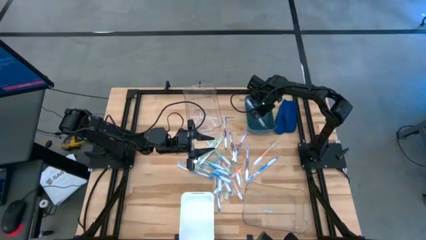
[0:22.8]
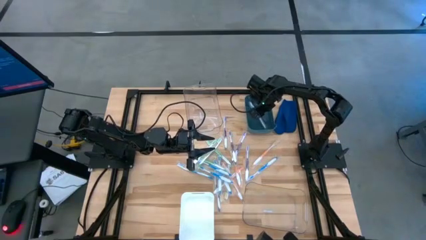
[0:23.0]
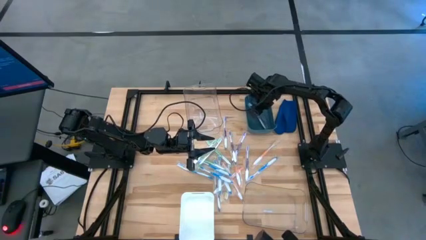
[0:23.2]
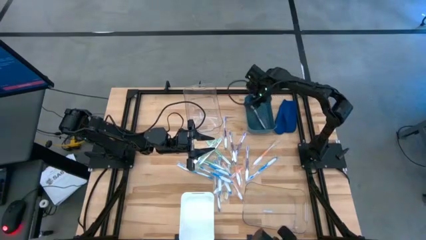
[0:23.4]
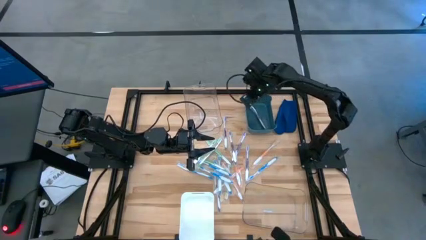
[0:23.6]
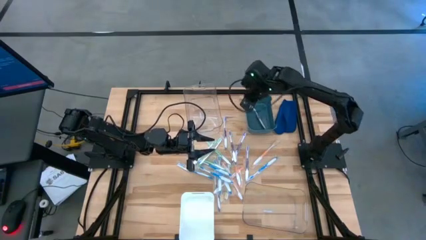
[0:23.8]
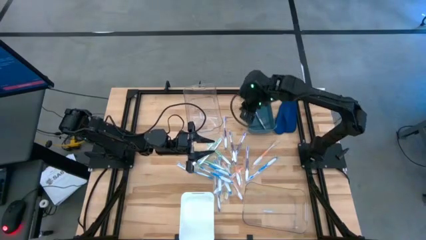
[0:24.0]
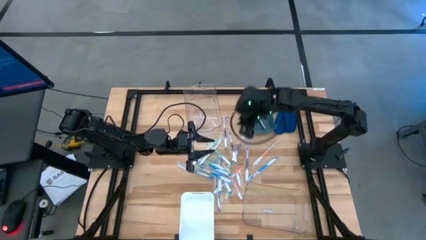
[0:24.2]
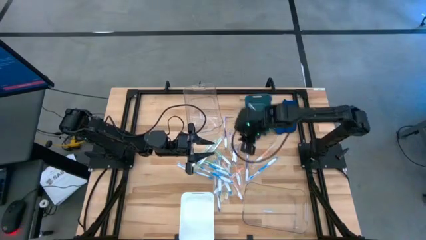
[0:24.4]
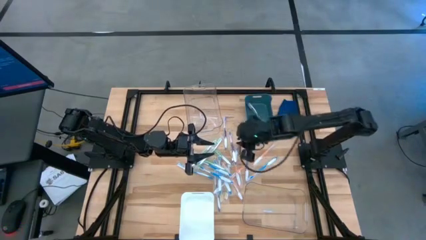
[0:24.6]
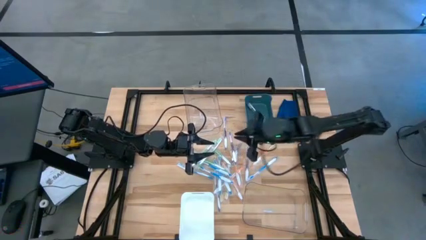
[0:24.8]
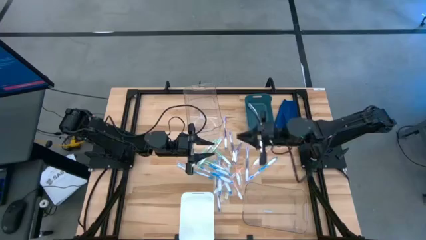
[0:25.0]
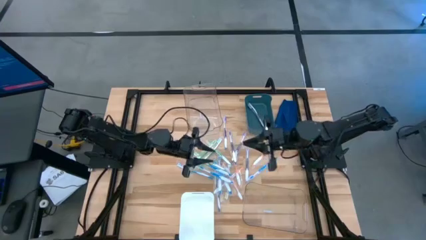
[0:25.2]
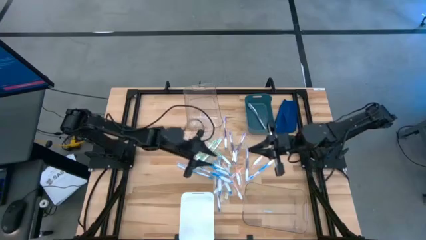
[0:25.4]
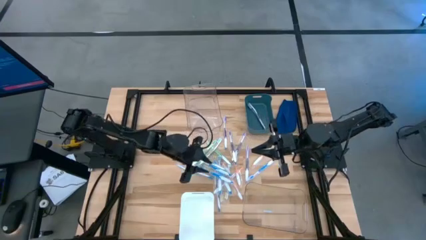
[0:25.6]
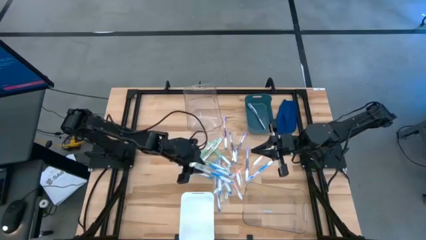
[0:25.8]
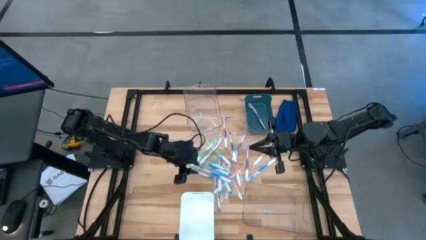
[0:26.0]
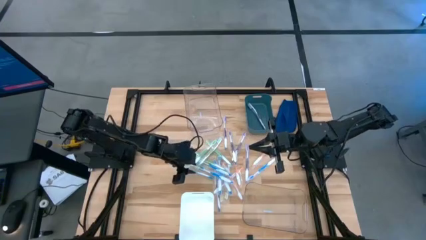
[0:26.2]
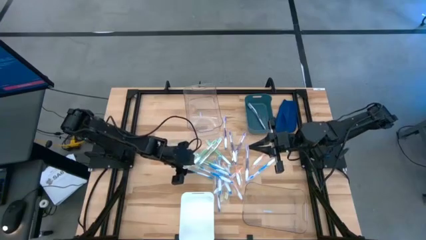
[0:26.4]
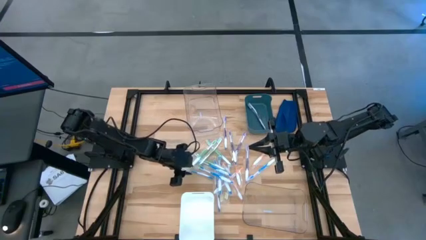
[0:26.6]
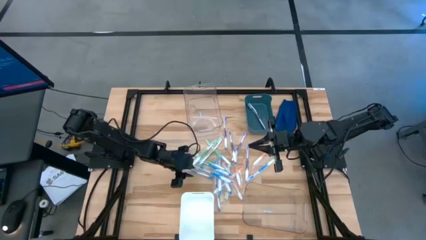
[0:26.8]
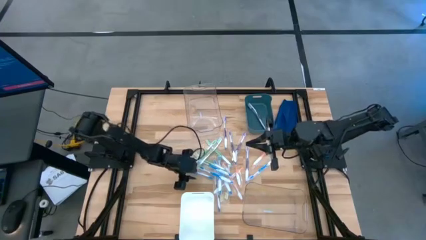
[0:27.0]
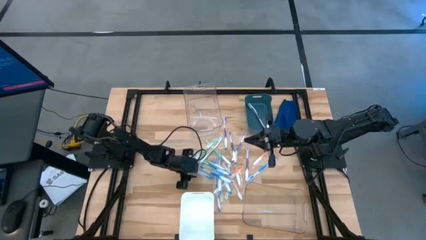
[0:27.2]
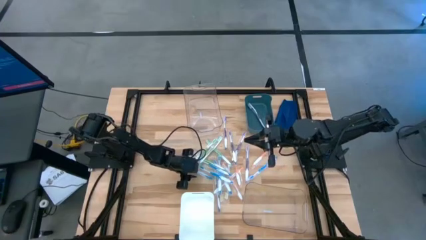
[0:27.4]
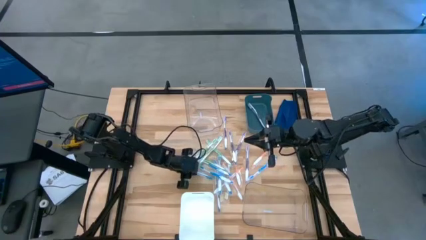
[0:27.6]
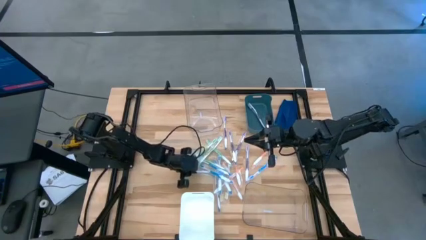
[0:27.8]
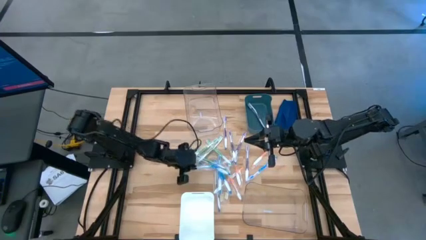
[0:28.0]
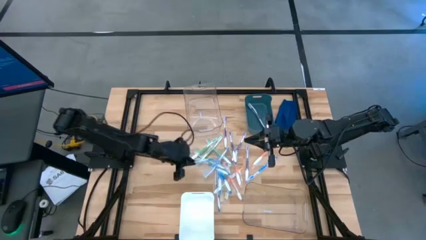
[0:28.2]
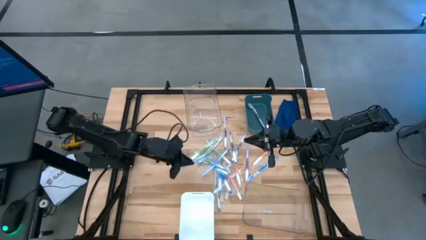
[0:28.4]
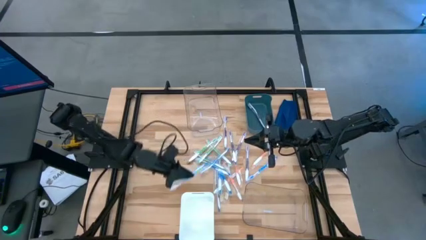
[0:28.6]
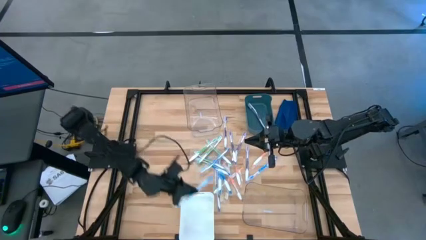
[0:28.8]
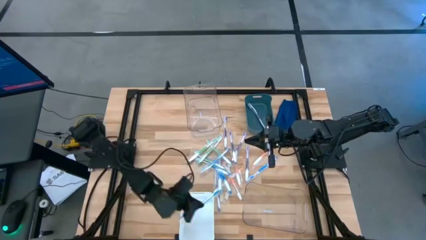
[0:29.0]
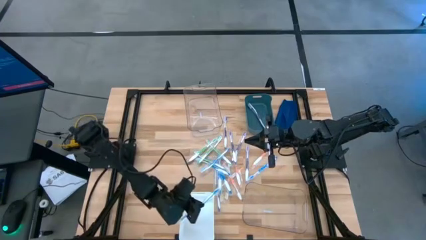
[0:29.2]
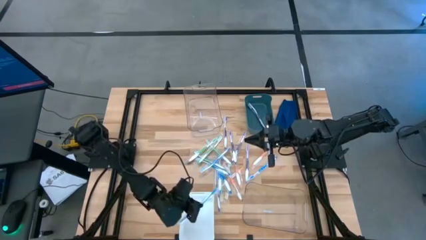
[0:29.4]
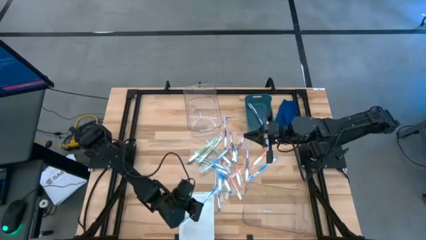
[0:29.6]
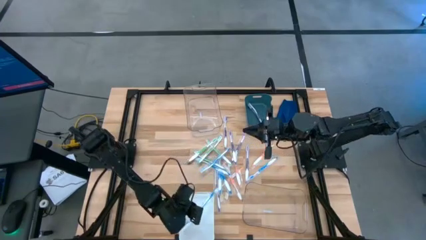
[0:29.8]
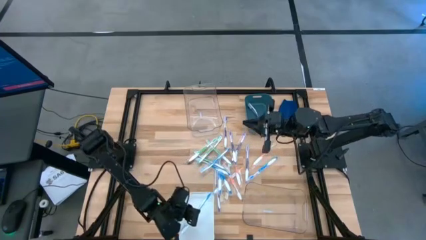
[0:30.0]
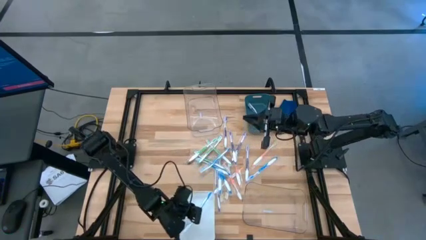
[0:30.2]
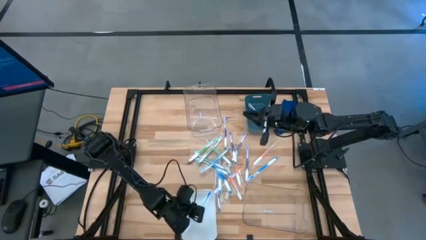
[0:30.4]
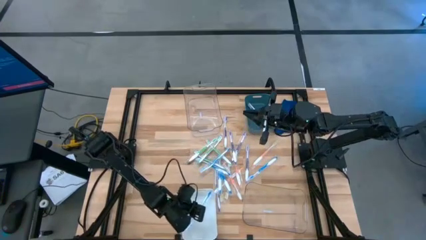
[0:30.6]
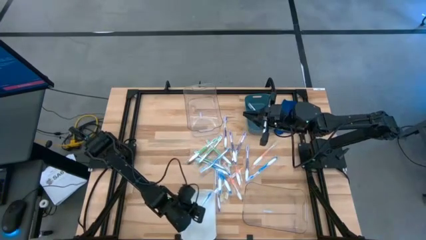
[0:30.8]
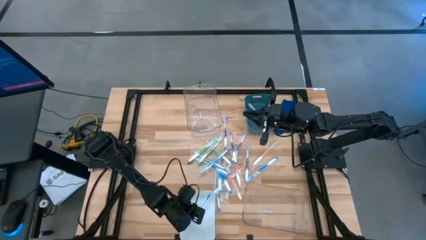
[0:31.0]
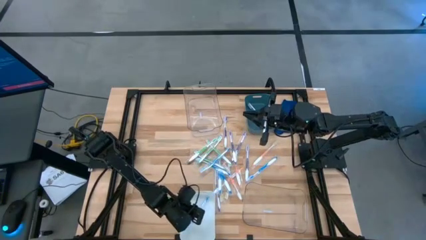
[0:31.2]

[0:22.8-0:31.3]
Task: Pick & Place Toothbrushes
Put the blue toothbrush into the white bin

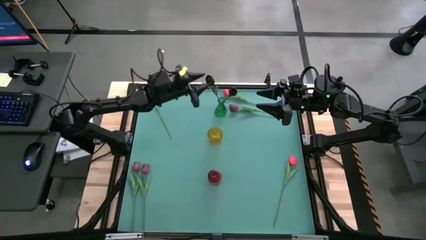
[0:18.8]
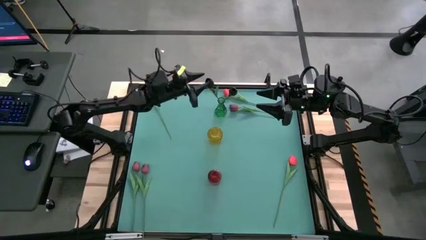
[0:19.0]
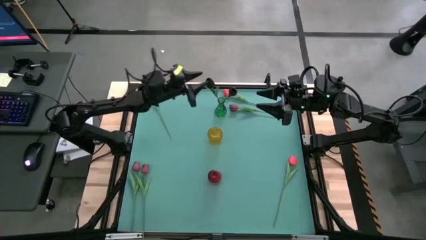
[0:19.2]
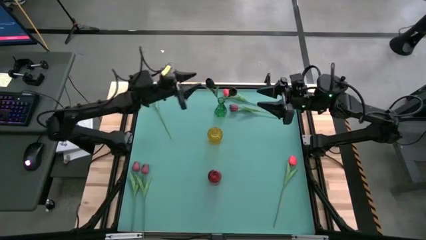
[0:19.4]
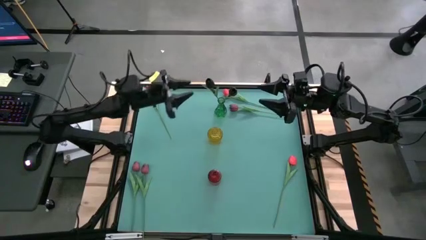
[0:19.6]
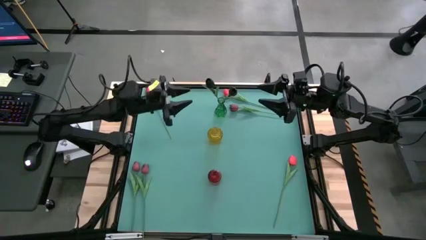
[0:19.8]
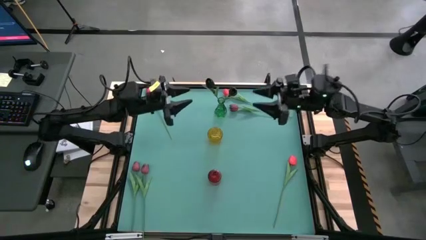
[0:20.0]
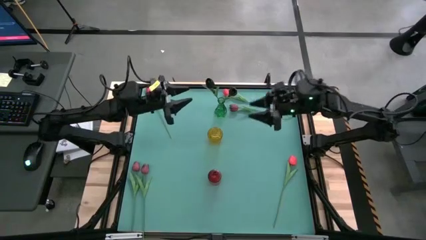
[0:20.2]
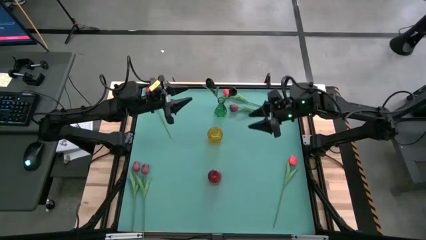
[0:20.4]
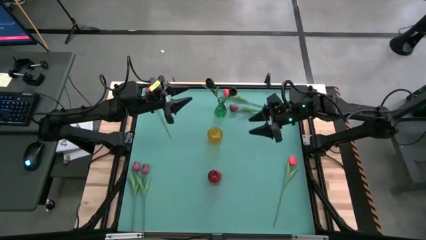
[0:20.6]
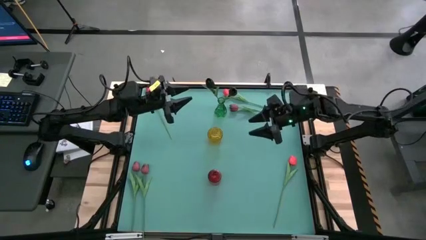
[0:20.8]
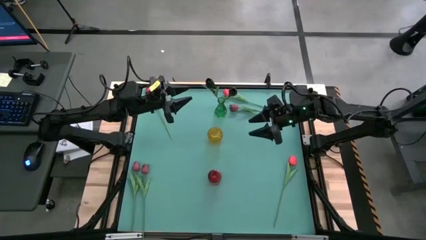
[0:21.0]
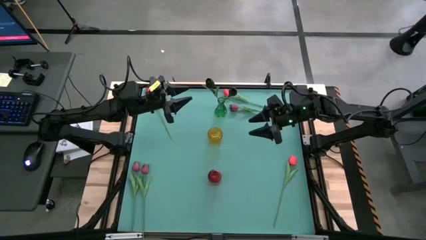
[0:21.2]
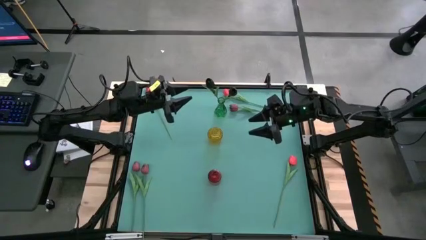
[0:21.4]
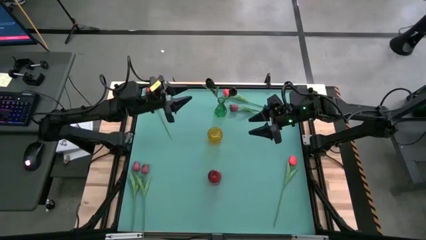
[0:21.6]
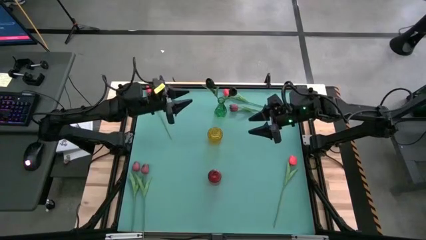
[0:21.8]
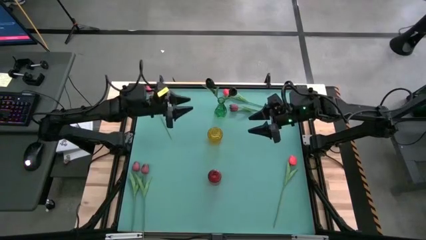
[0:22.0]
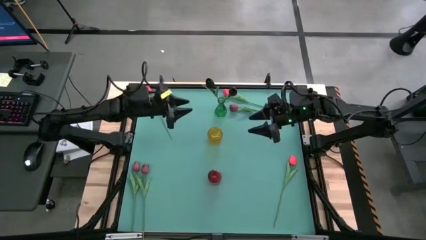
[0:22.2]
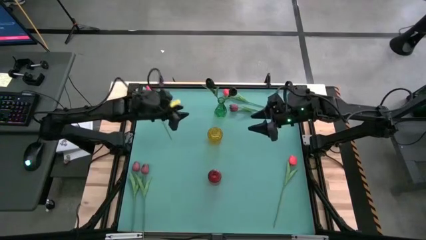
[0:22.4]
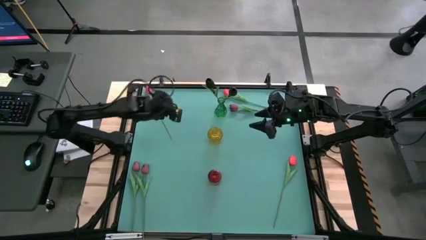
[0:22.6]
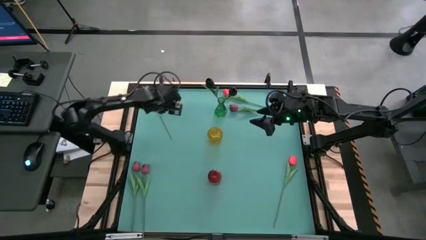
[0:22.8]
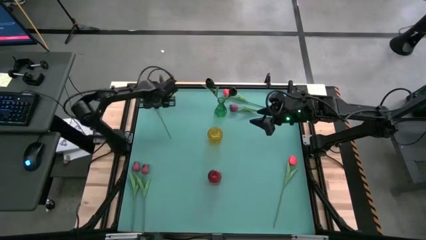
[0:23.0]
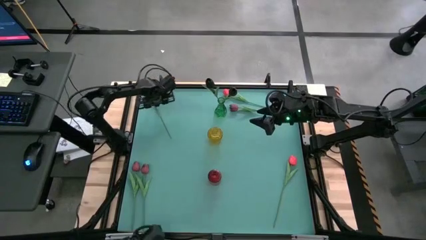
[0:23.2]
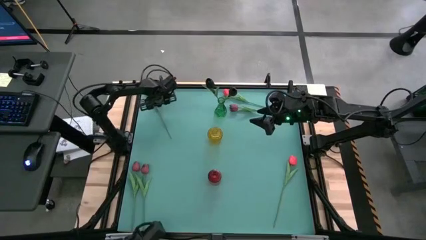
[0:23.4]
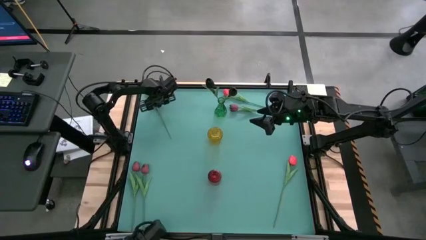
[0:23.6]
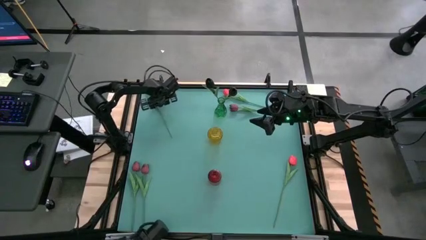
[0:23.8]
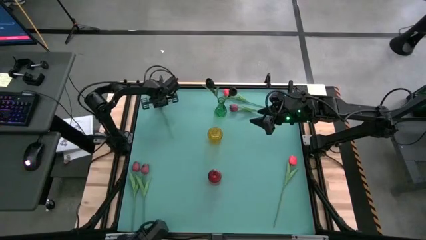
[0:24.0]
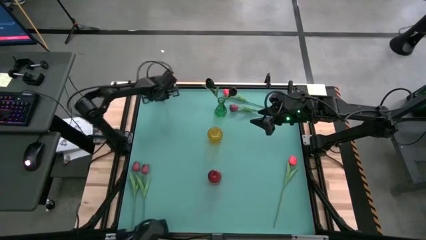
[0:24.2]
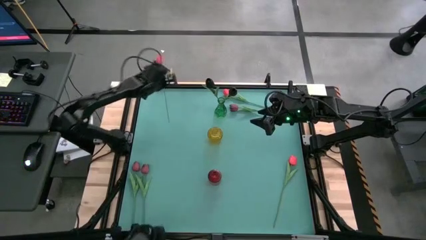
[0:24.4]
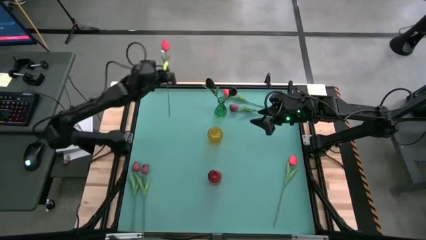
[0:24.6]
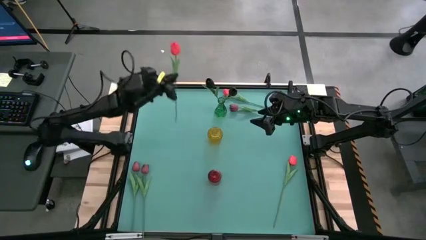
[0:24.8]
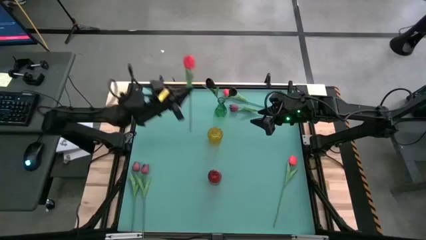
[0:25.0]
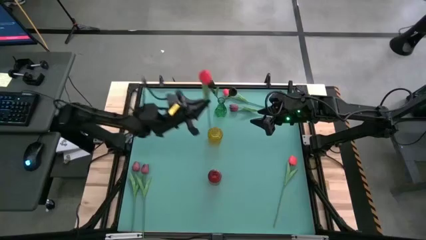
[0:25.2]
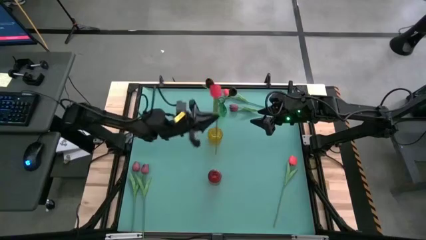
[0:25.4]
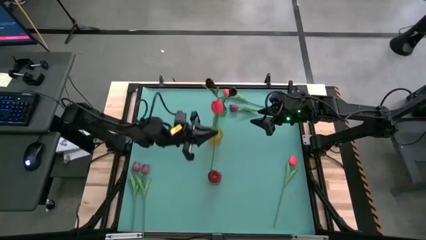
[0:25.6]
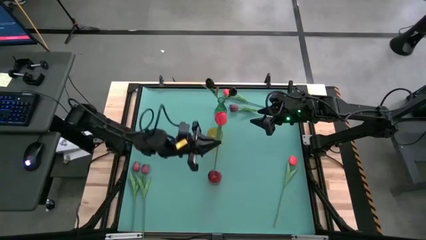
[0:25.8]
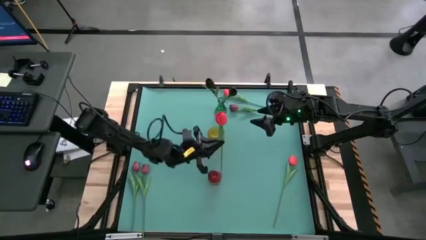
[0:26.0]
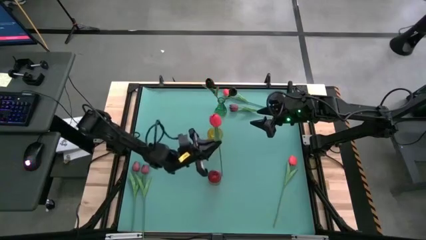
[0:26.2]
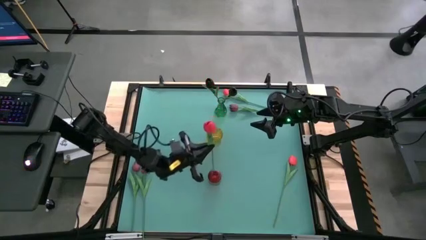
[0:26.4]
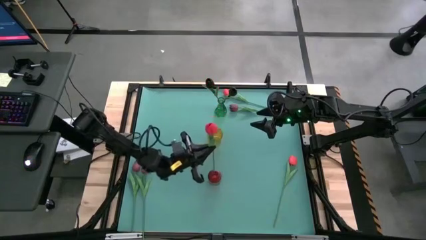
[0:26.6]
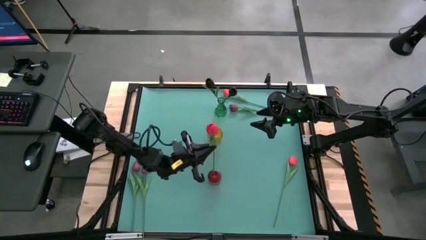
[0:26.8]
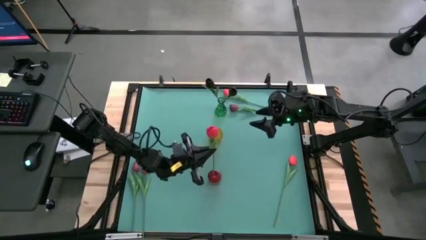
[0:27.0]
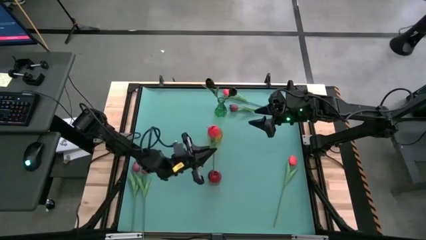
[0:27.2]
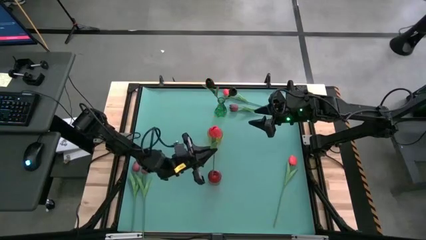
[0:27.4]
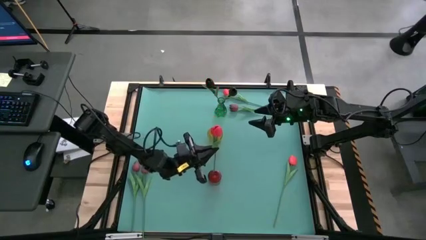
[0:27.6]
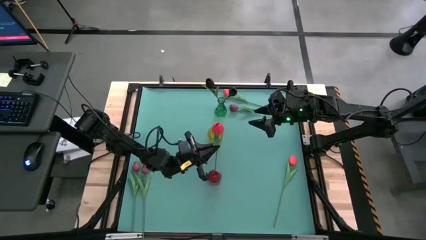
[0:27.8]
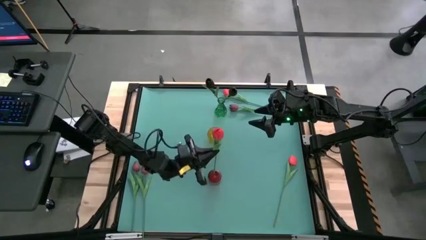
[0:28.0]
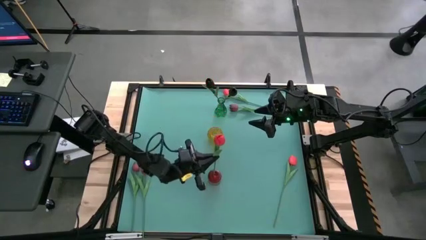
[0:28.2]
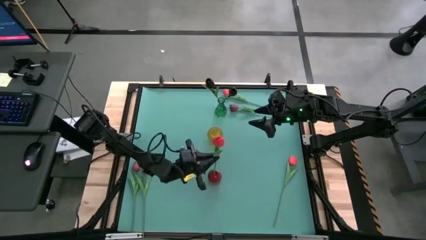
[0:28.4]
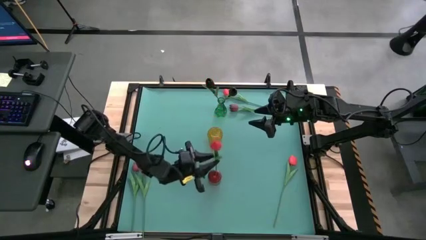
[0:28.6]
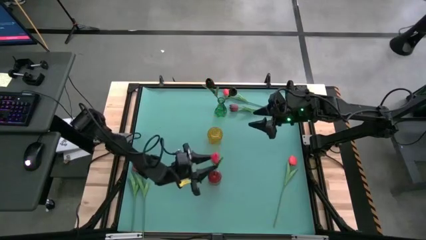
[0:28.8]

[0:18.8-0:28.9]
Task: Sort flowers into vase by color
Put the top left pink flower into the red flower vase
